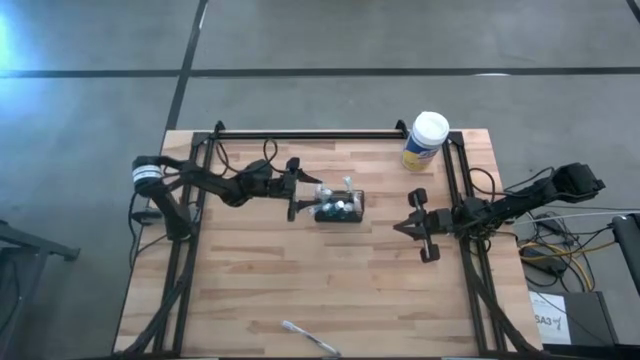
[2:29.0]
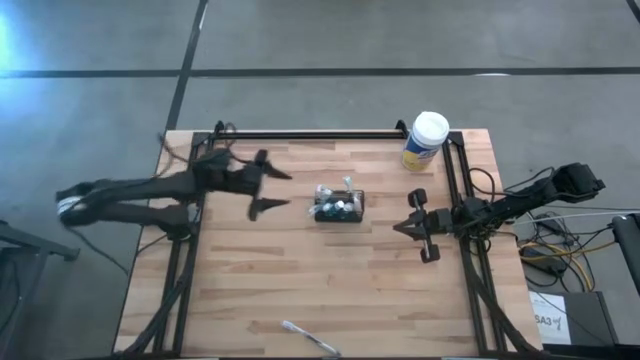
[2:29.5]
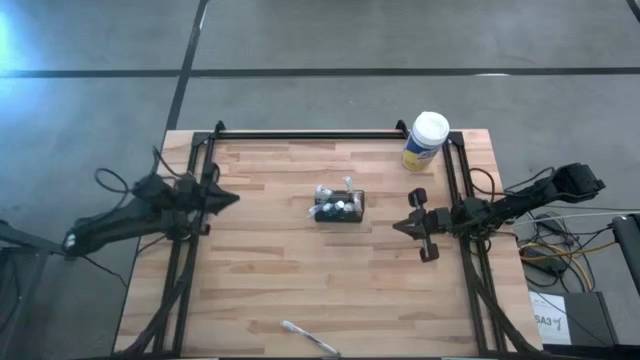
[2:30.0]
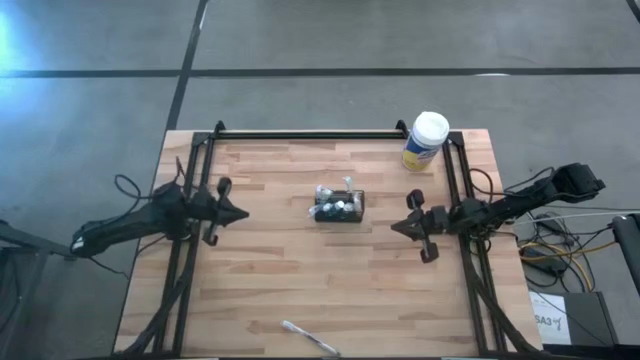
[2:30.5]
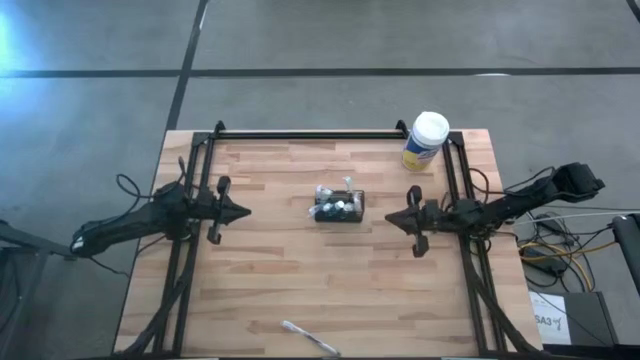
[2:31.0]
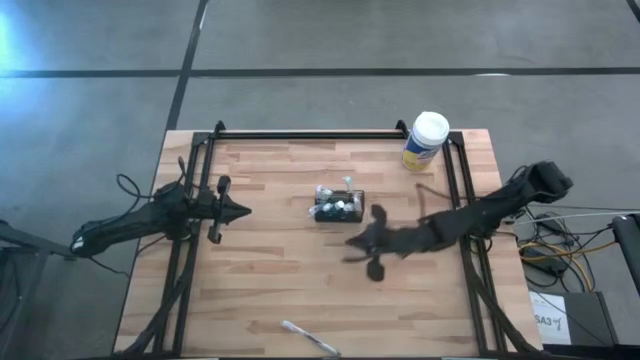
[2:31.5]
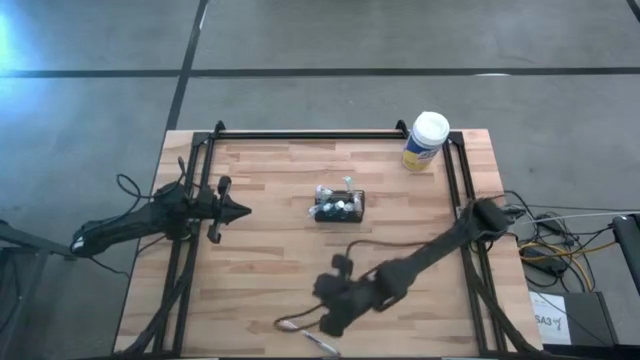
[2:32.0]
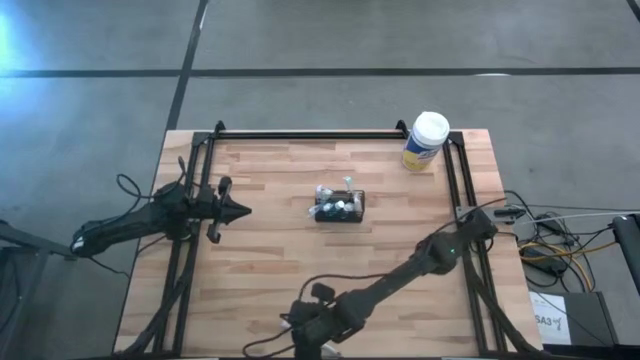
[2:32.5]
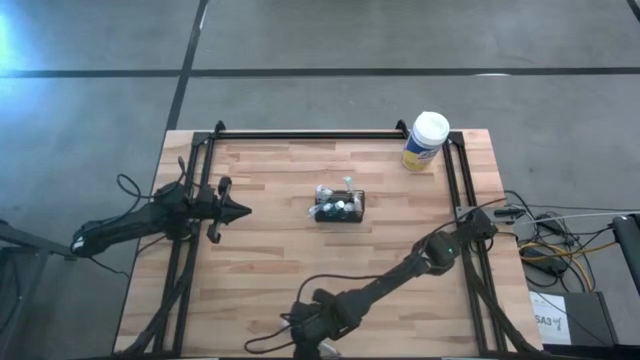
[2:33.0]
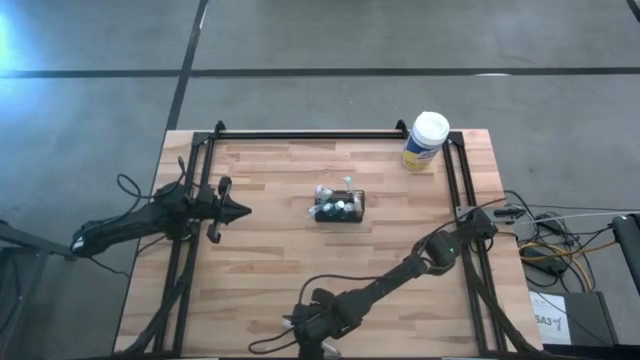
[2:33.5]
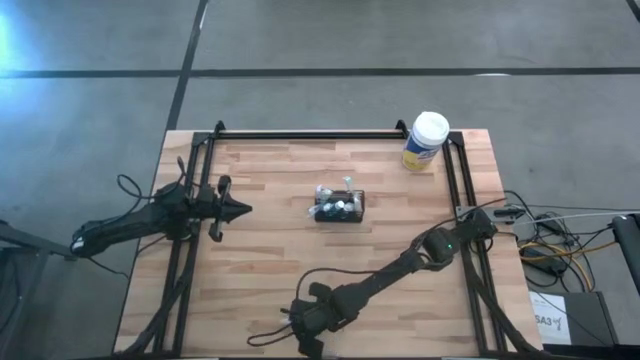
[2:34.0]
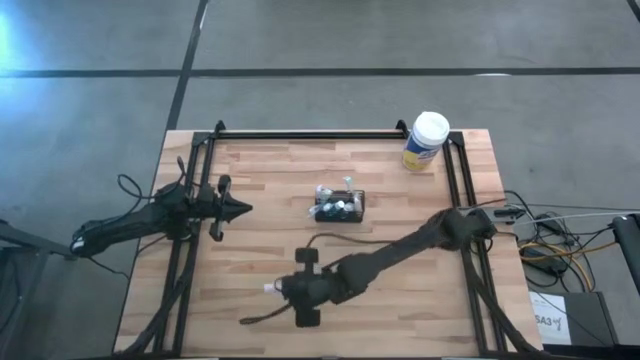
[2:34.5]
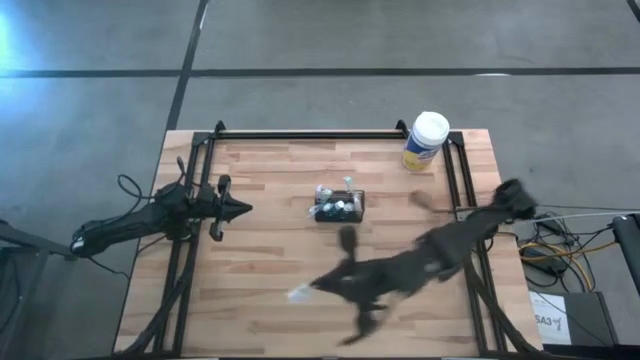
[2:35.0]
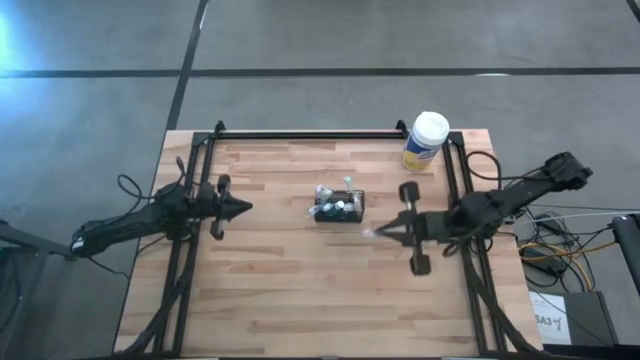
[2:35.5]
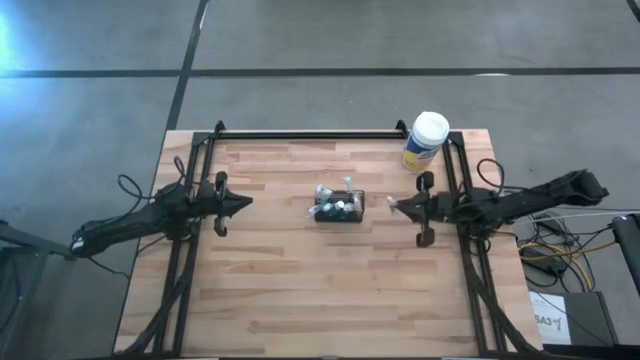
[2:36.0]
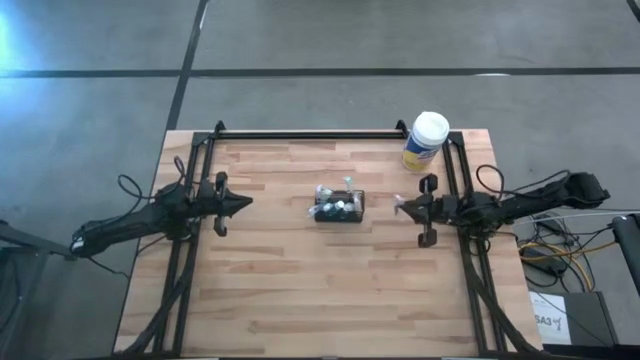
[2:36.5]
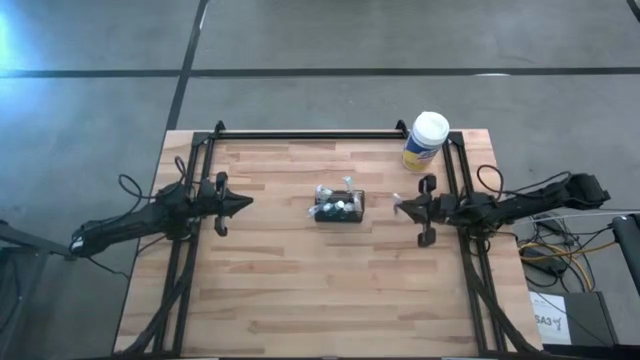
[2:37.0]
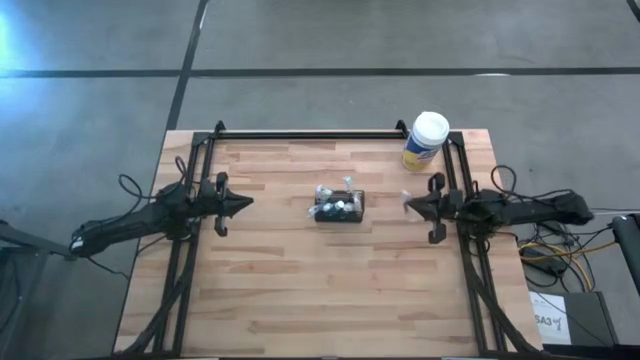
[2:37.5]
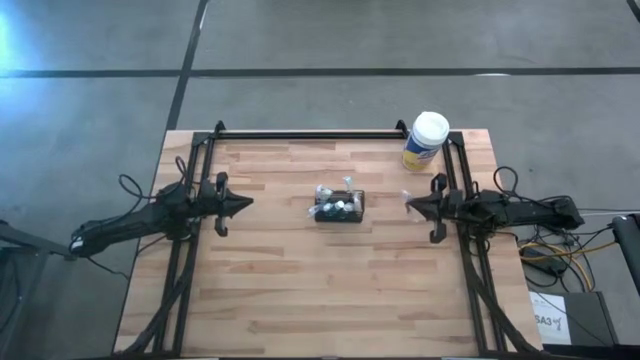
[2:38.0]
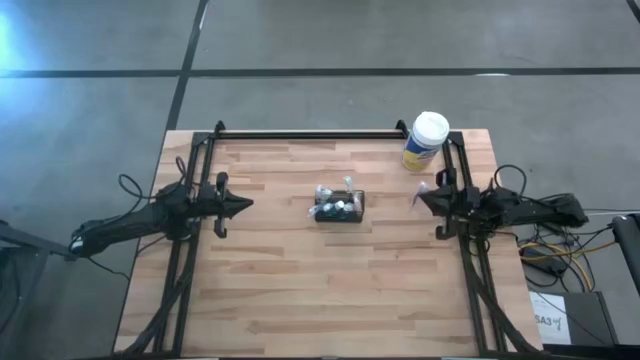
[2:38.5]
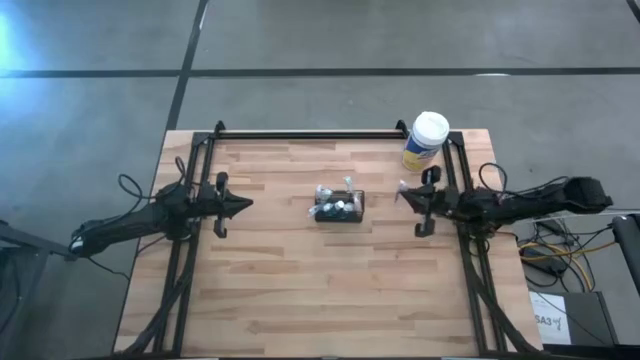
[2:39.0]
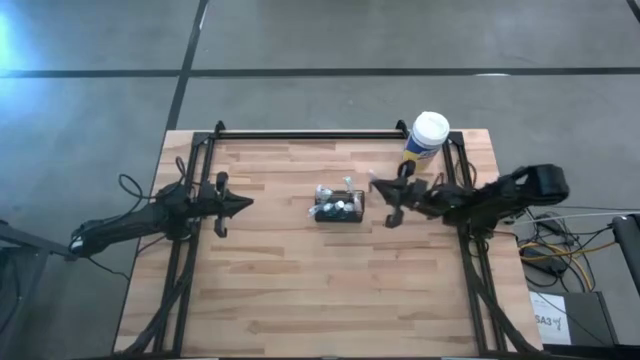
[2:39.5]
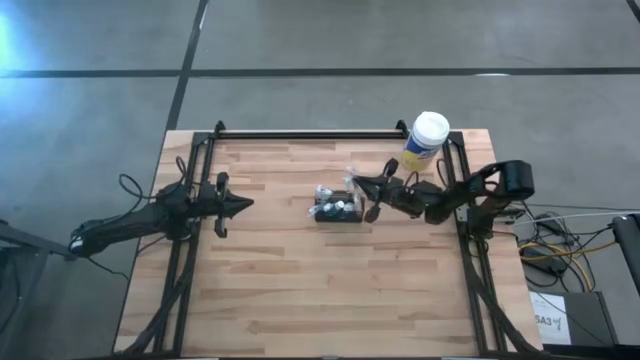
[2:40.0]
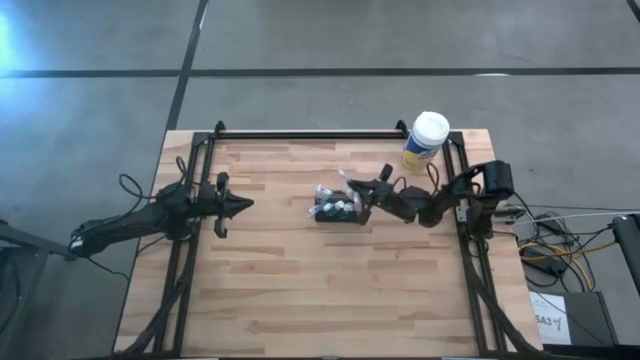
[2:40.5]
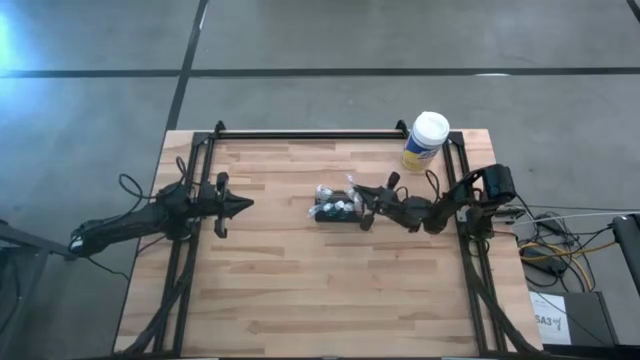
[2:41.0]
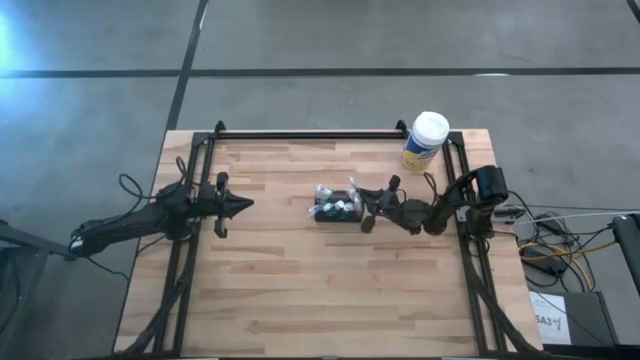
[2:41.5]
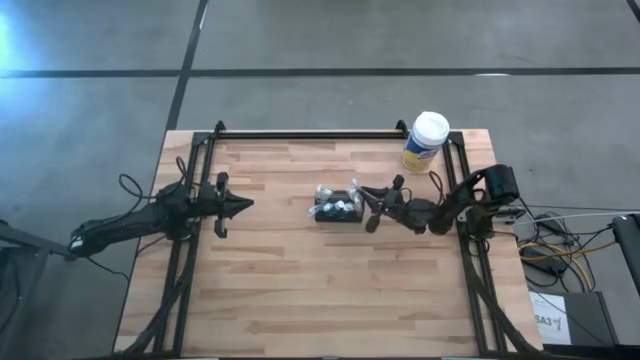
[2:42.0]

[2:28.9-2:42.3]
Task: Pick & Place toothbrushing station
Put the violet toothbrush into the black wire organizer

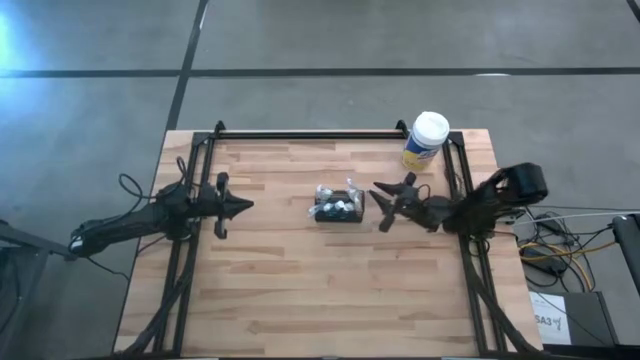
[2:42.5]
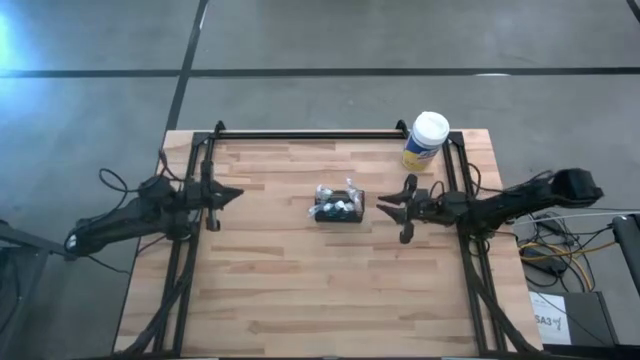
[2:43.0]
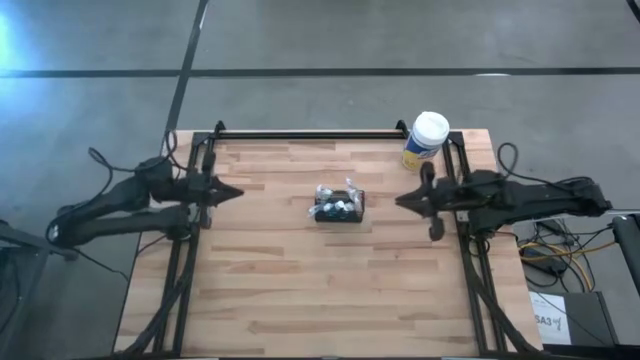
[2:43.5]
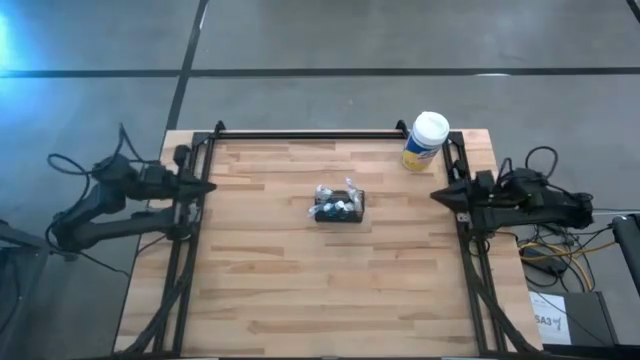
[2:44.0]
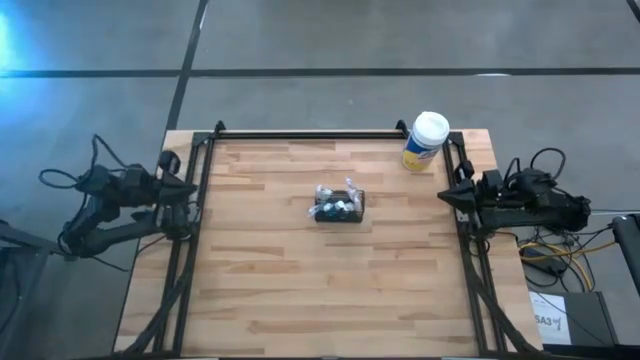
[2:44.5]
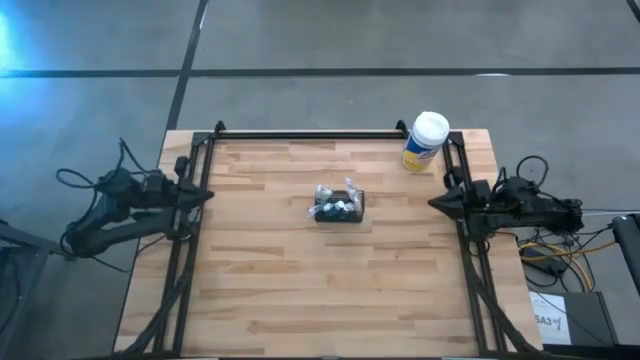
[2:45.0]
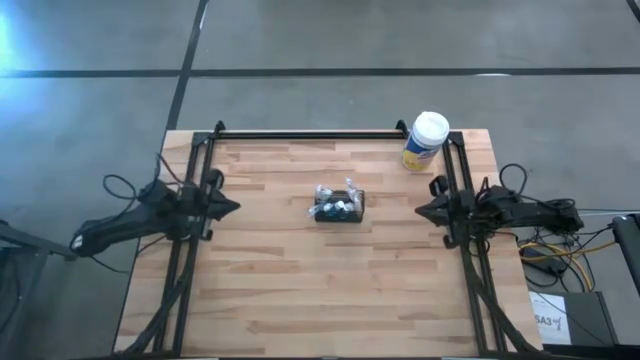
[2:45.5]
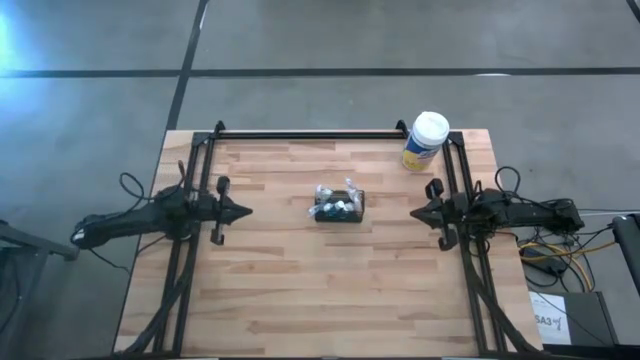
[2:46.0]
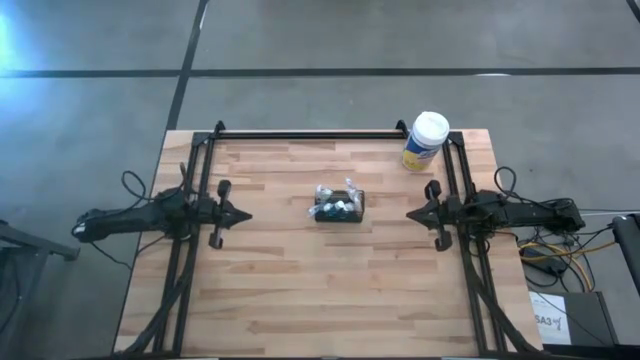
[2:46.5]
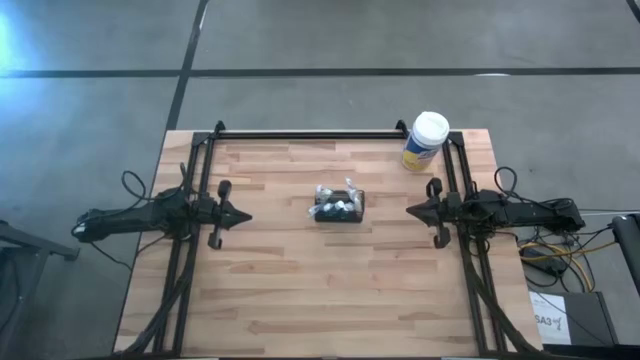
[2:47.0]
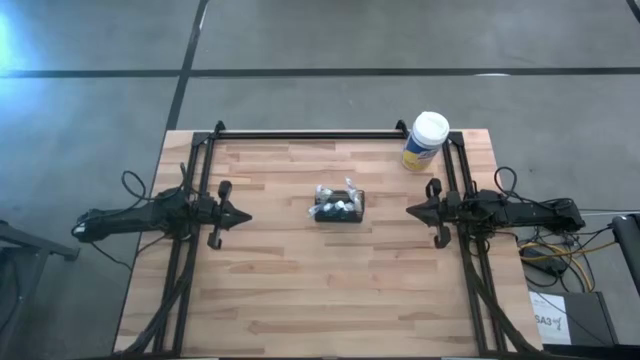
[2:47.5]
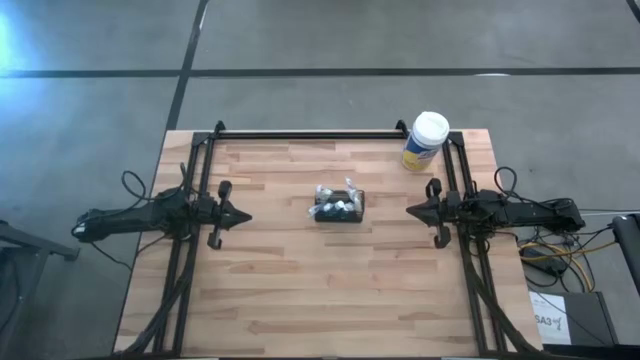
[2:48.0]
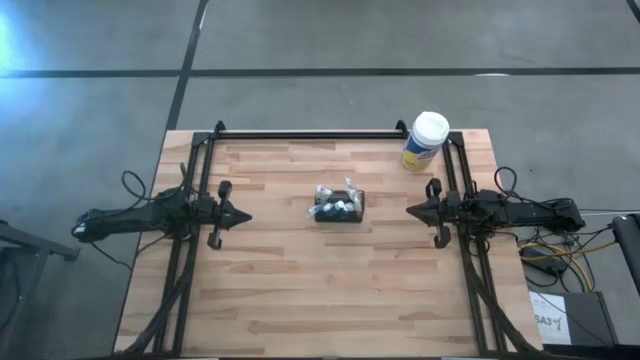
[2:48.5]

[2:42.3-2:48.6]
Return to Home Position

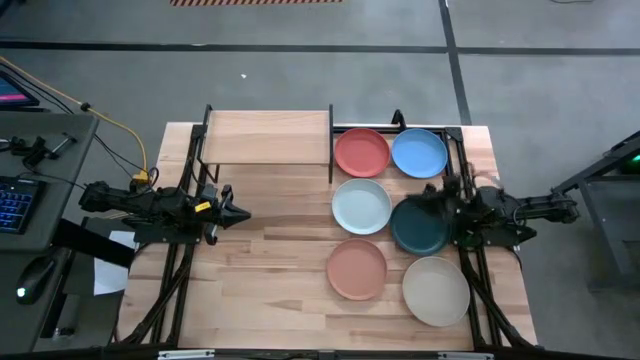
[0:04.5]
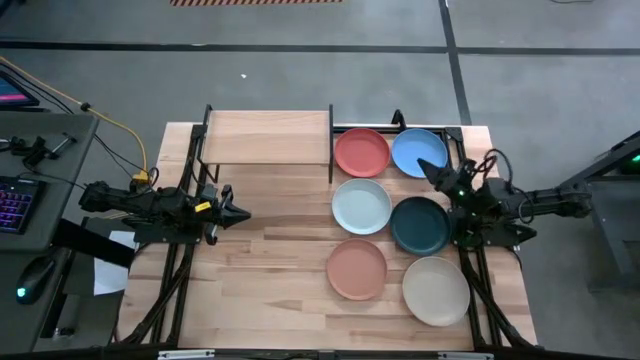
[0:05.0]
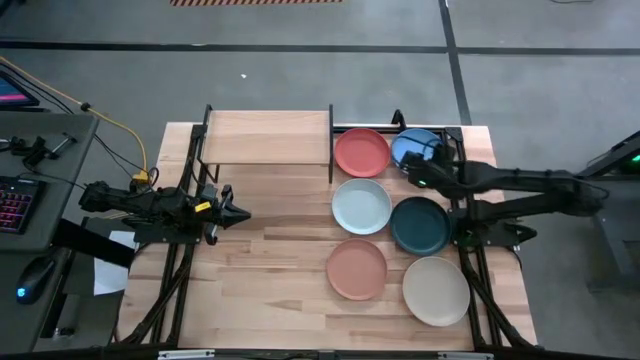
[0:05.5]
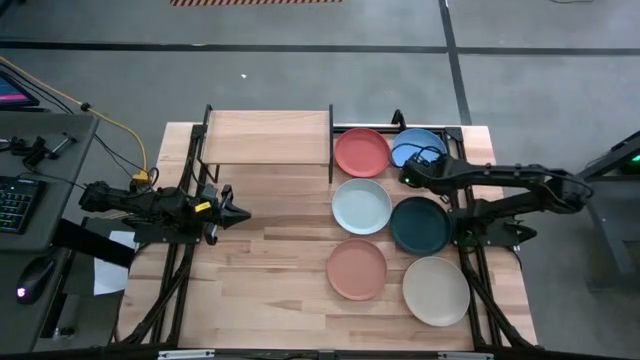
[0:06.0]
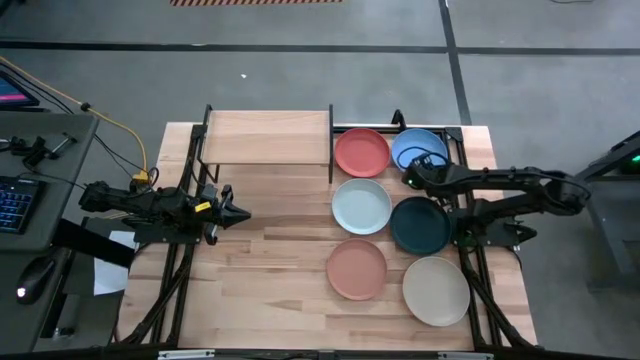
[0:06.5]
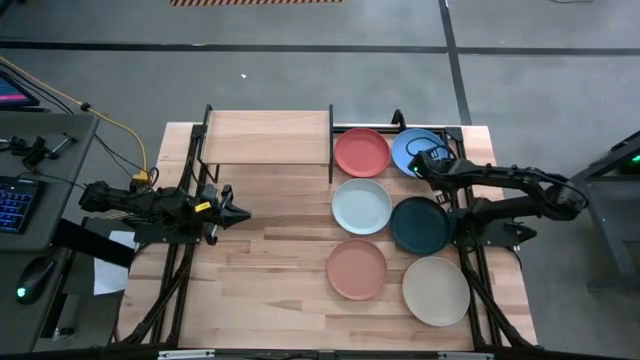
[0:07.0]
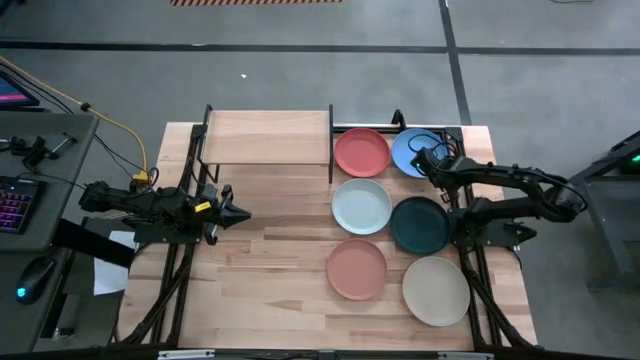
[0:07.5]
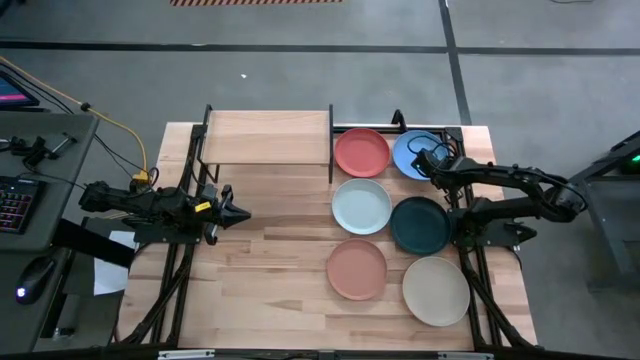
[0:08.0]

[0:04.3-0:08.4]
Task: Place and stack plates onto a shelf
Put the light blue plate on the shelf
